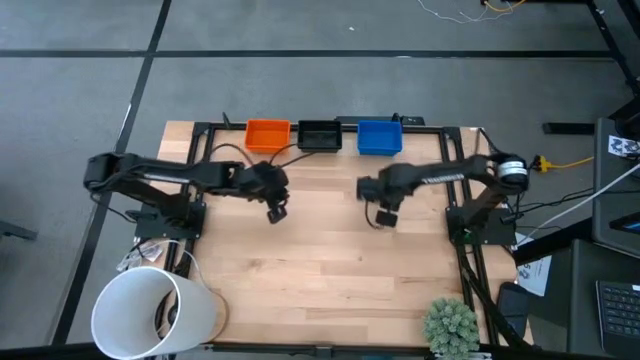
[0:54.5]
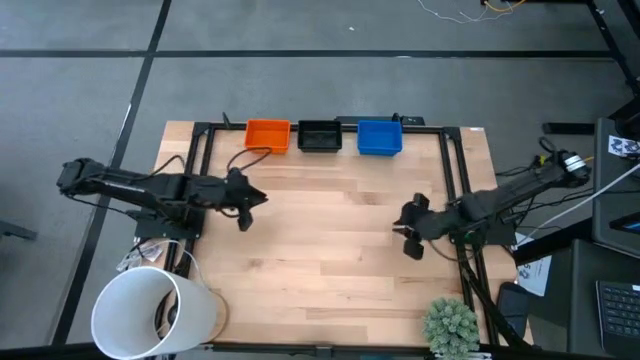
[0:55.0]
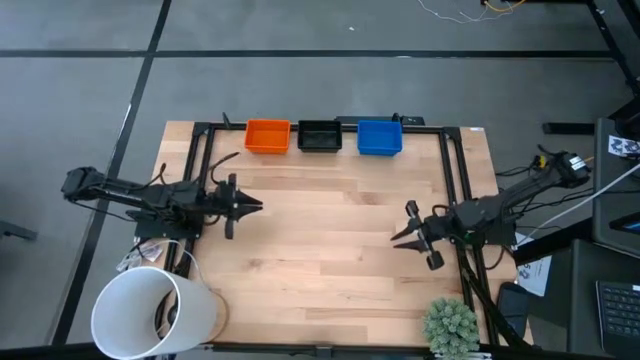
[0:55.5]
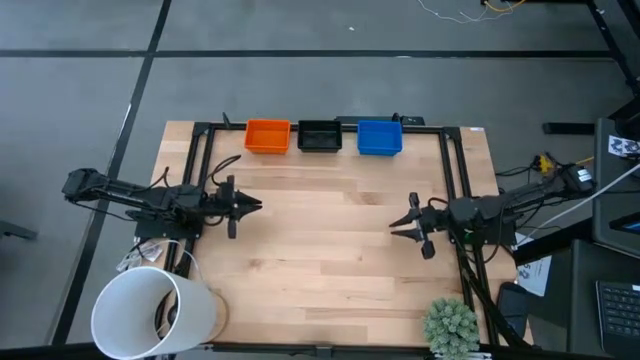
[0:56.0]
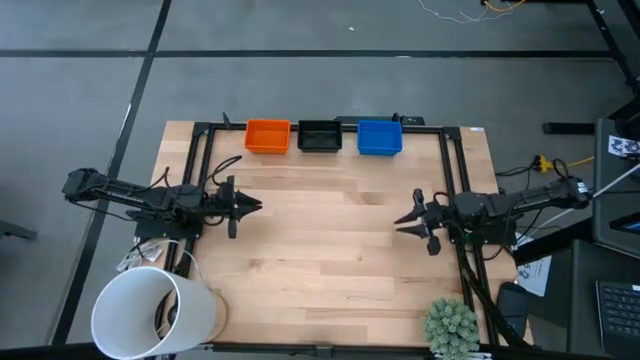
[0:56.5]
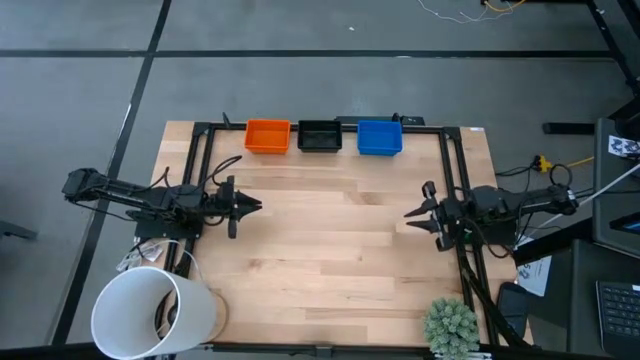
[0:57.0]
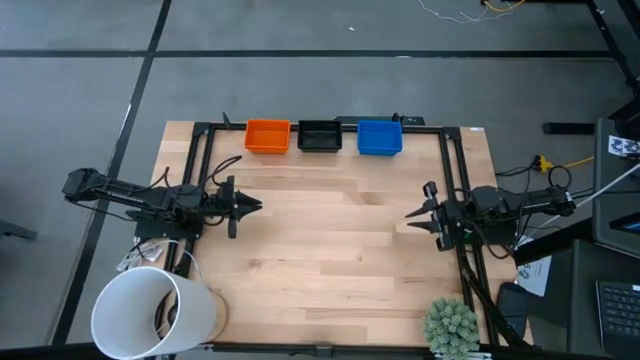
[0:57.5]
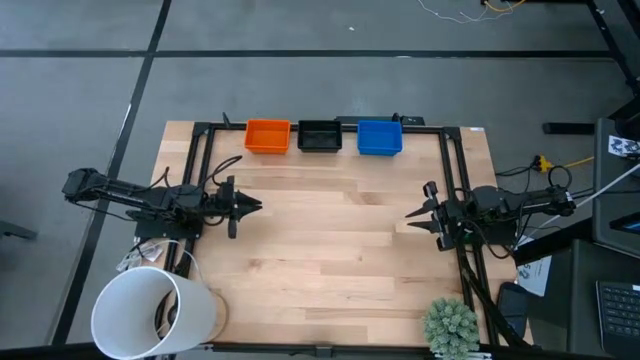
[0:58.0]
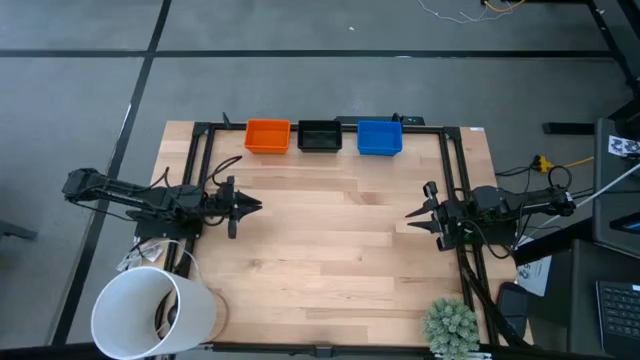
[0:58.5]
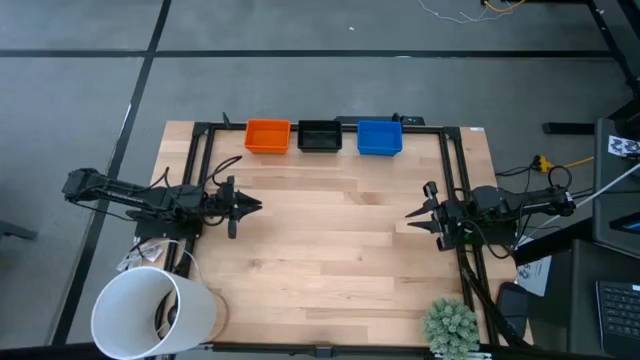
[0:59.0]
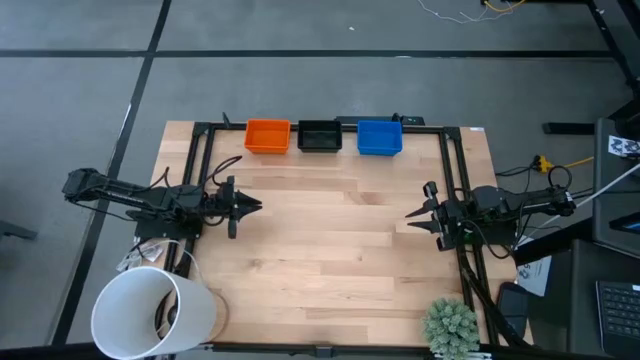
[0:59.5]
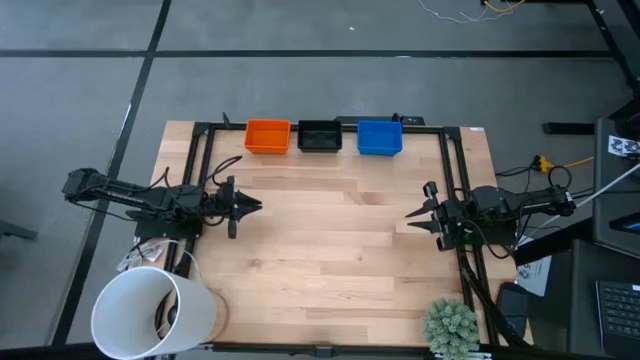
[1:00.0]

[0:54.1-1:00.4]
Return to Home Position
